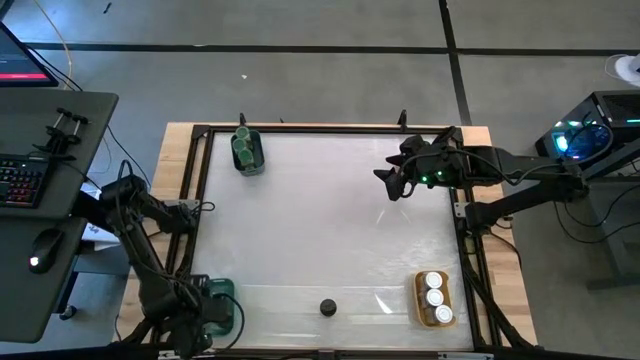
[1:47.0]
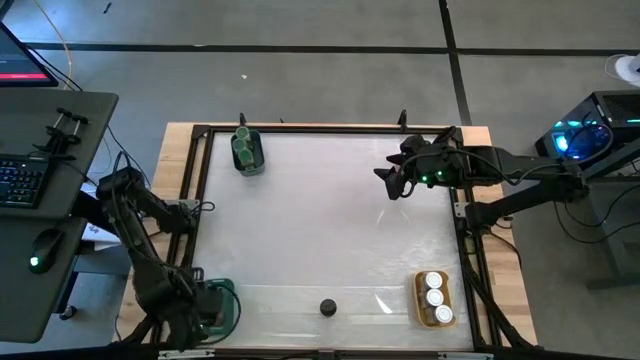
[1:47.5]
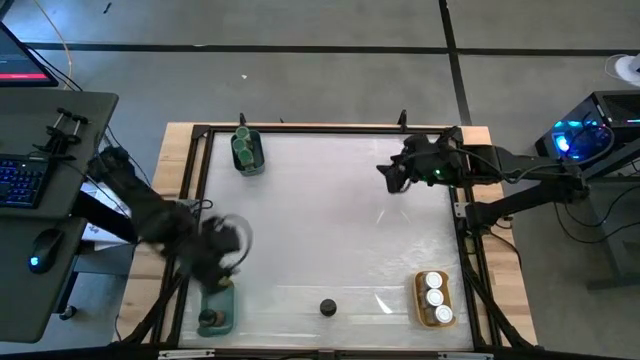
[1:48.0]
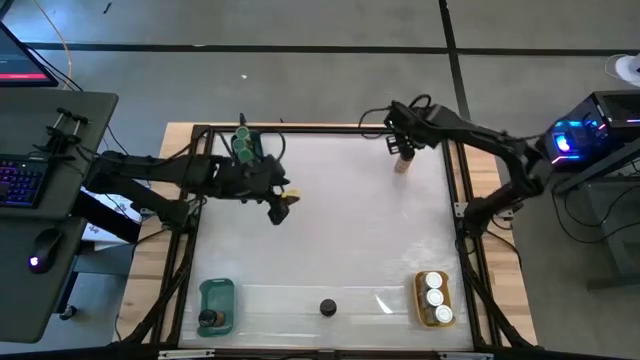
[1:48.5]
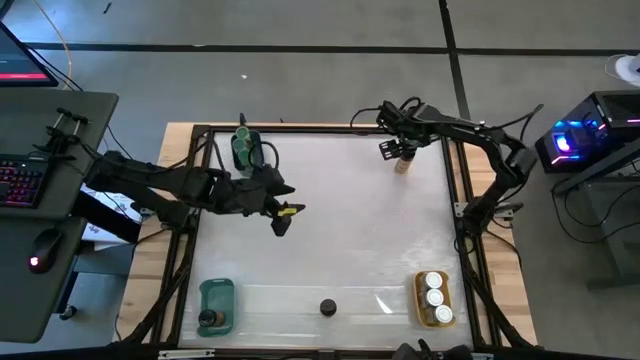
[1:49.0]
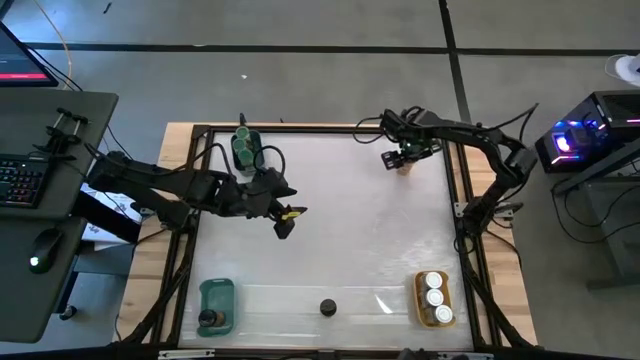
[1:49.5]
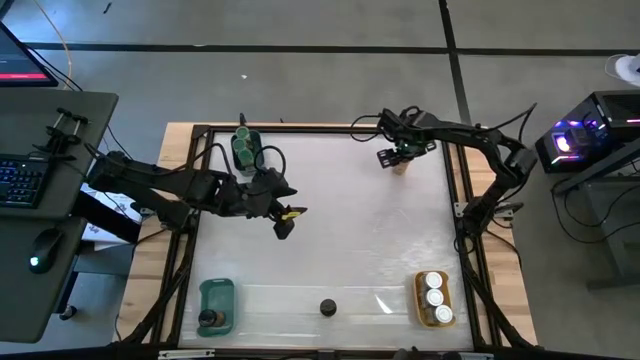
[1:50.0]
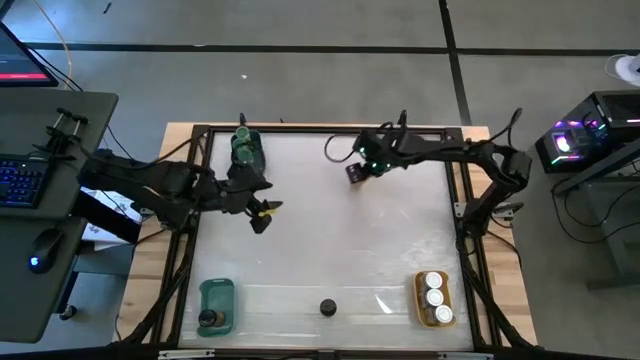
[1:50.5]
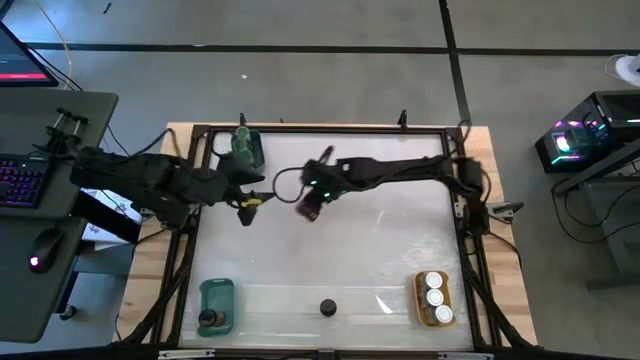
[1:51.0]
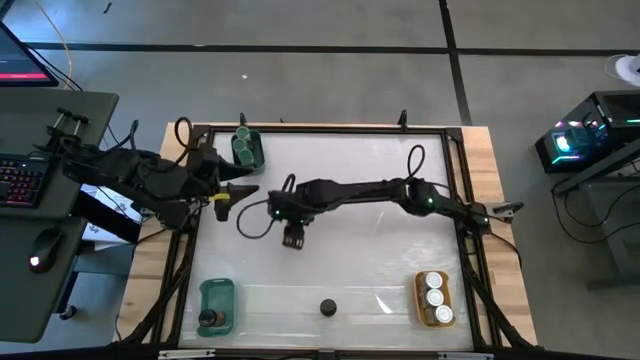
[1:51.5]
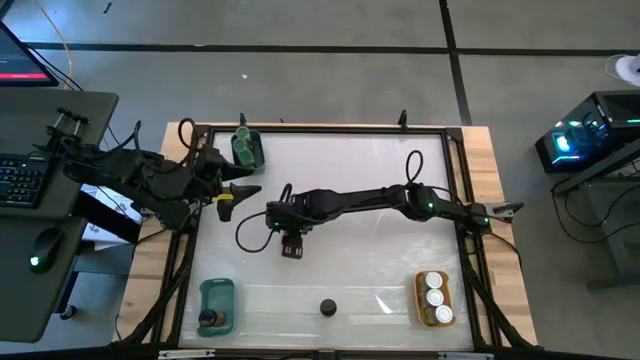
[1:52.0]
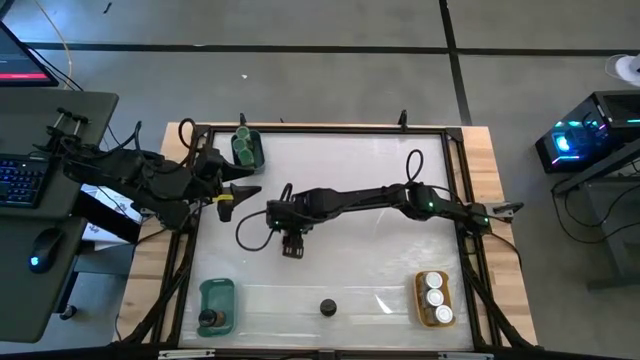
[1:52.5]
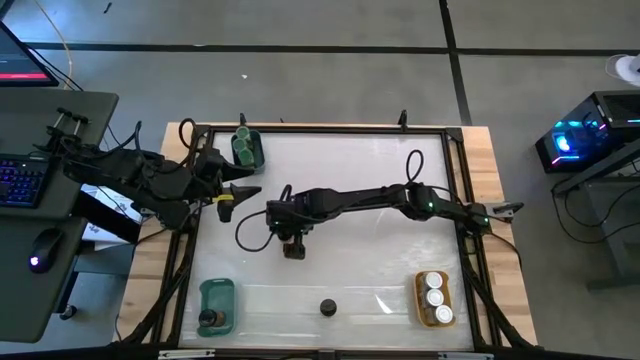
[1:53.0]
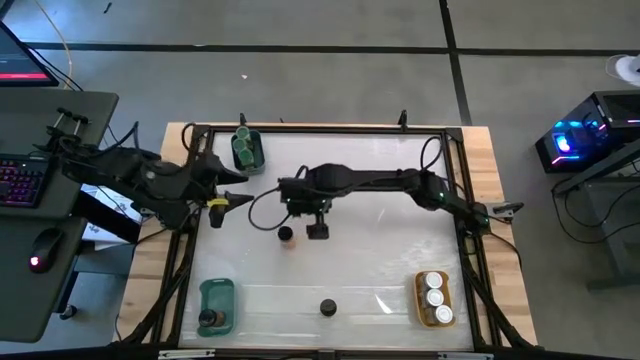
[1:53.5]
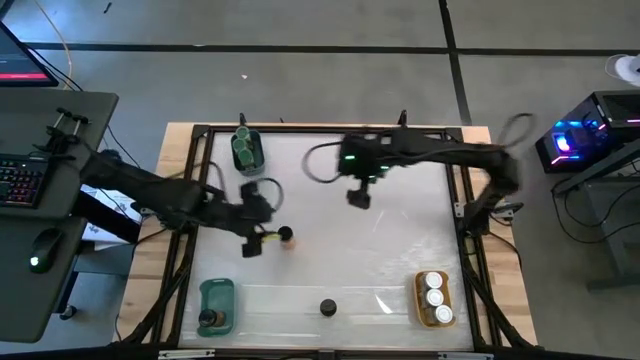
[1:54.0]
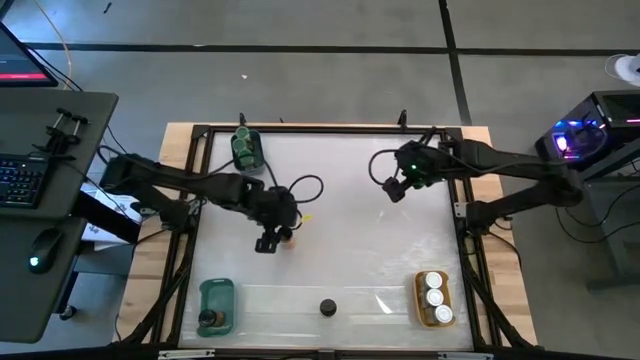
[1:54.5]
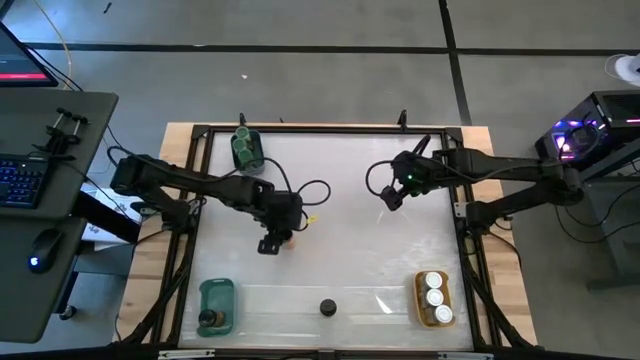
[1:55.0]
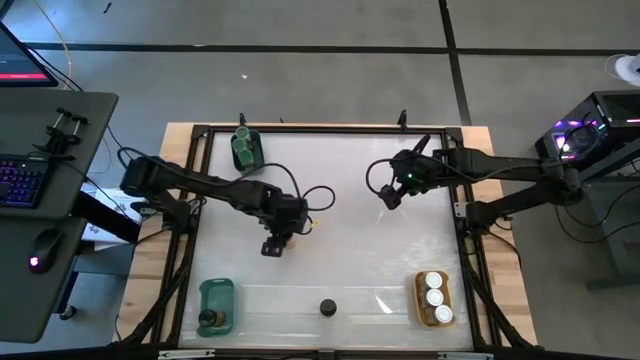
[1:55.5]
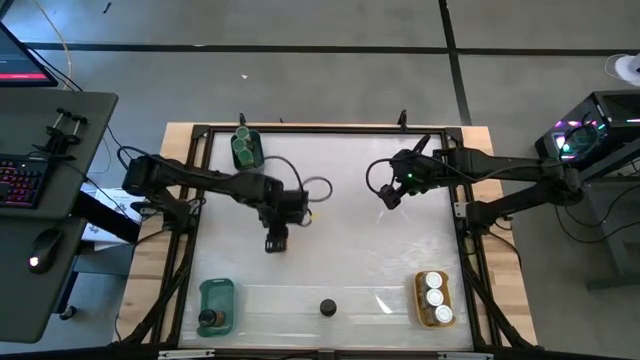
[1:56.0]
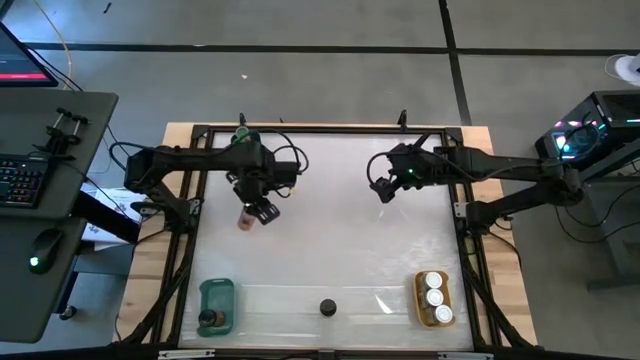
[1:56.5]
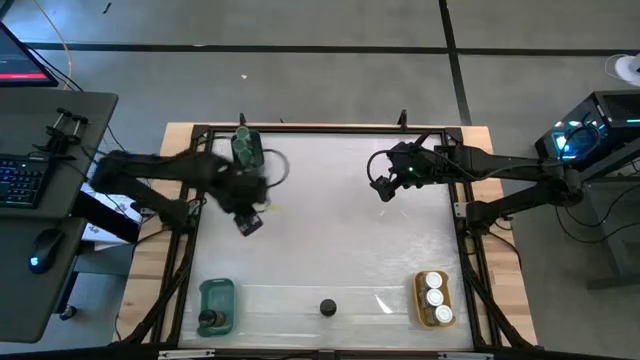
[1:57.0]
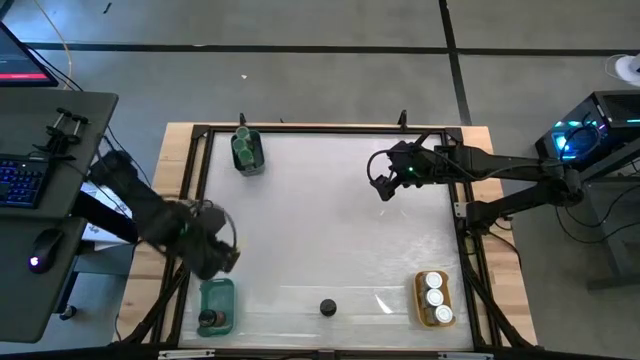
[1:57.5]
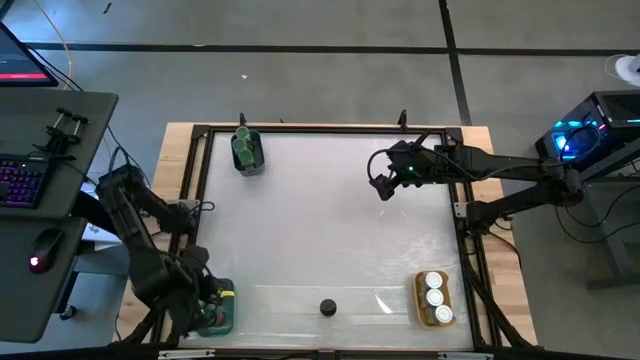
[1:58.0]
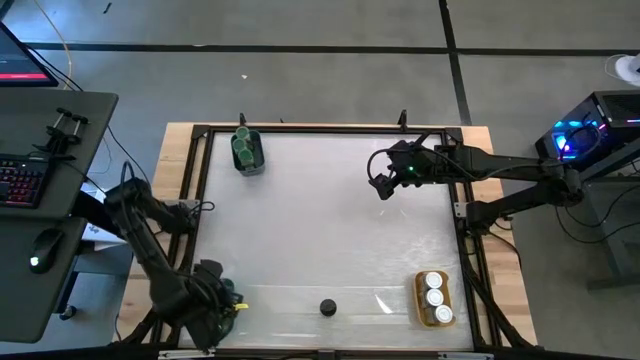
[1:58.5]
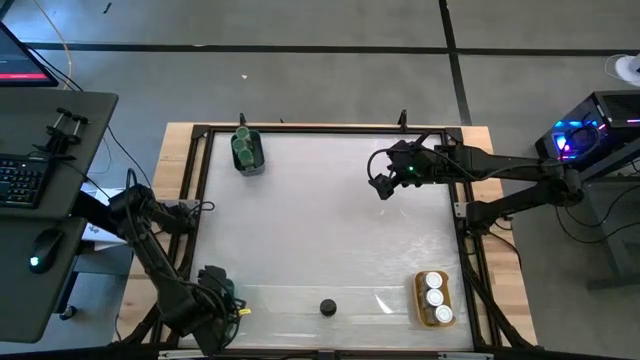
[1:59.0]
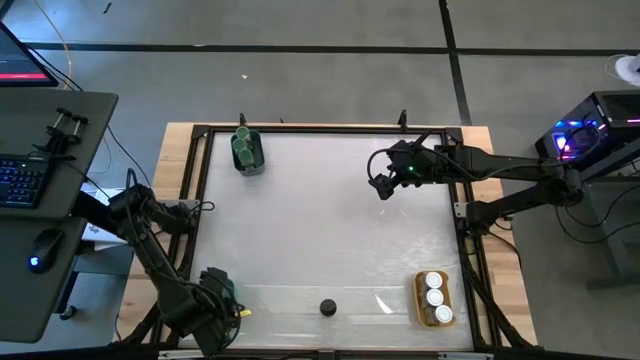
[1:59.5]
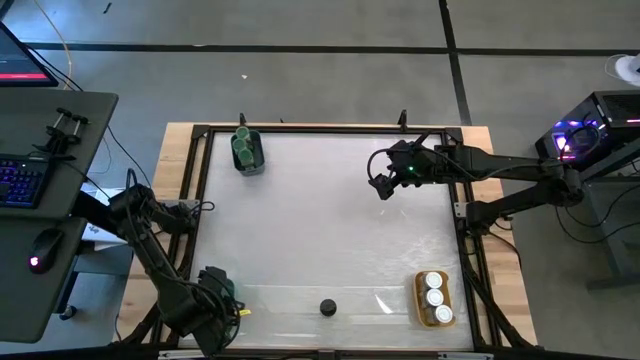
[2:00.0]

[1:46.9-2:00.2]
Task: Sort spices by type
Put the top black seasoning bottle into the green bin

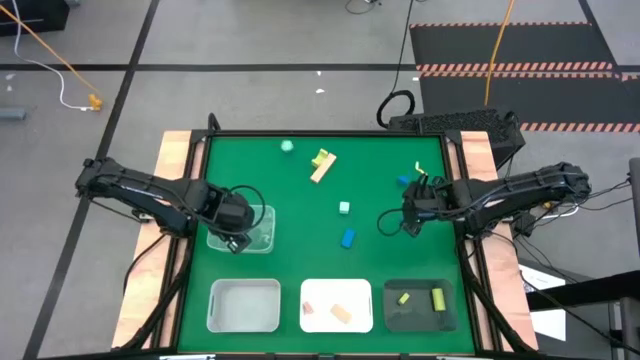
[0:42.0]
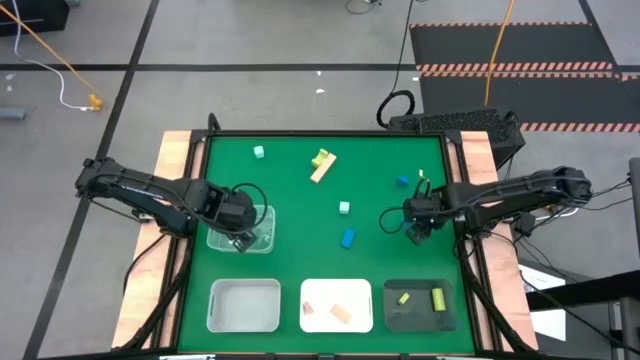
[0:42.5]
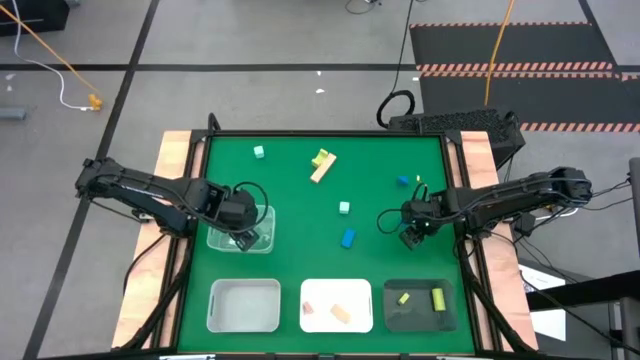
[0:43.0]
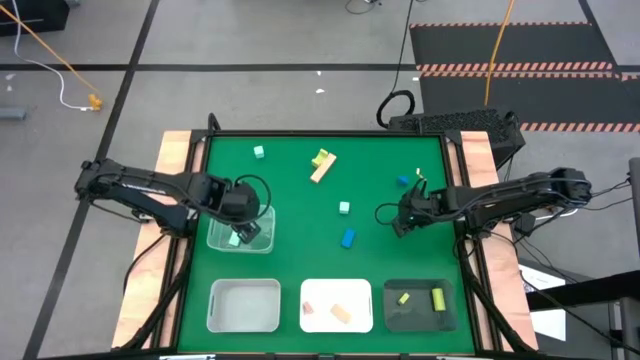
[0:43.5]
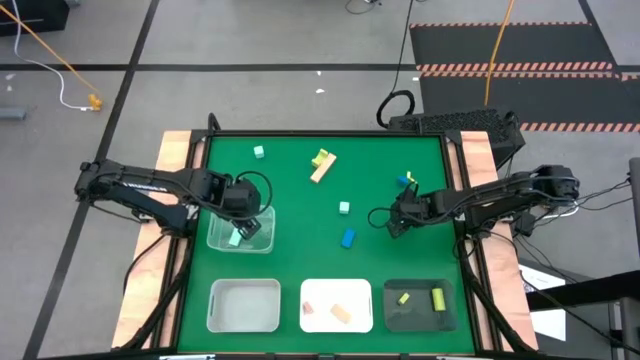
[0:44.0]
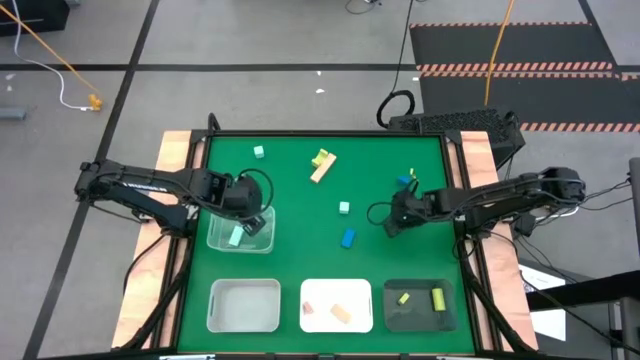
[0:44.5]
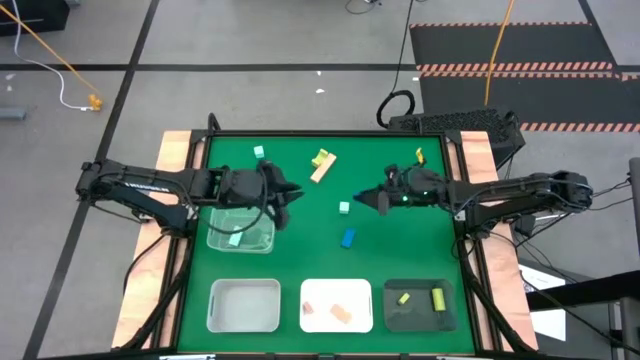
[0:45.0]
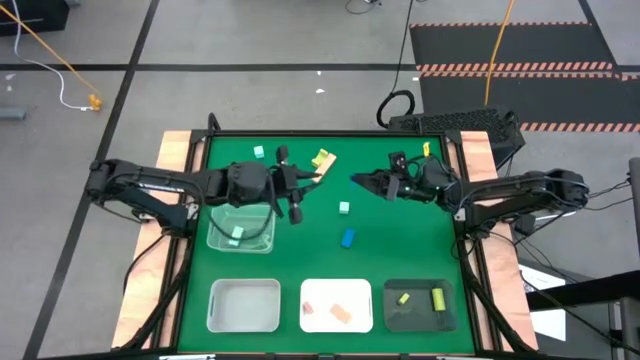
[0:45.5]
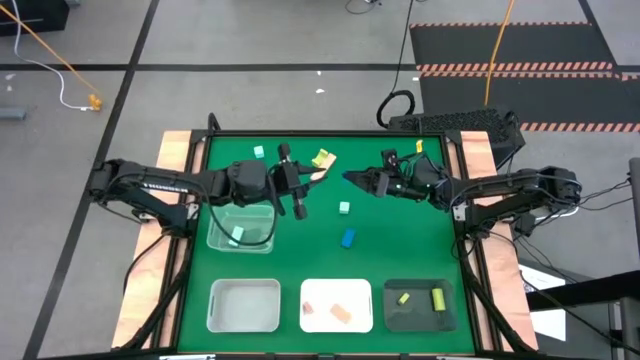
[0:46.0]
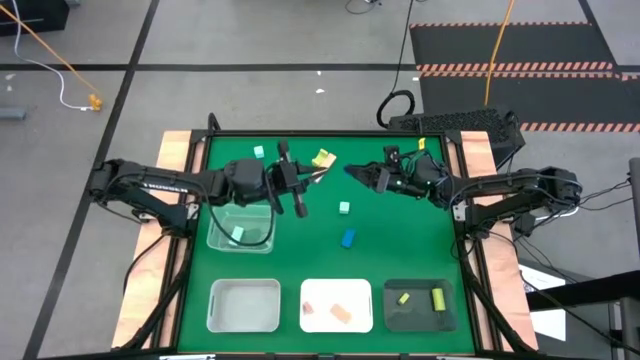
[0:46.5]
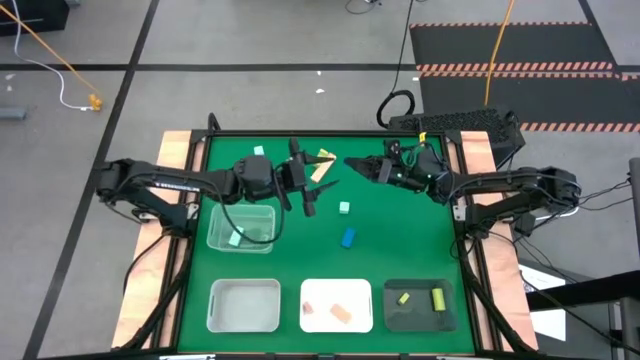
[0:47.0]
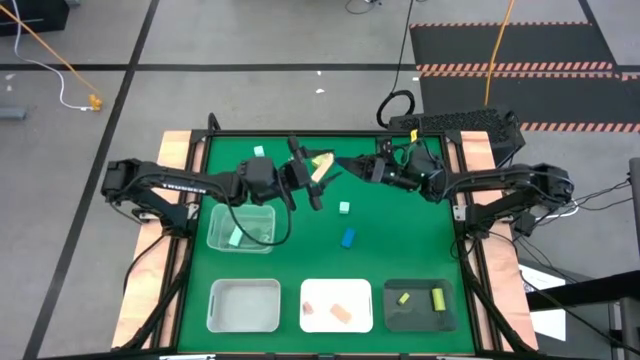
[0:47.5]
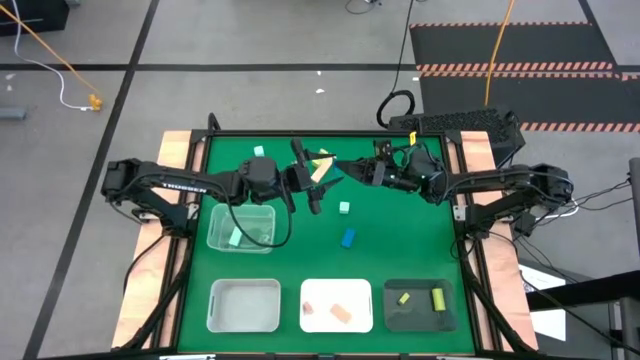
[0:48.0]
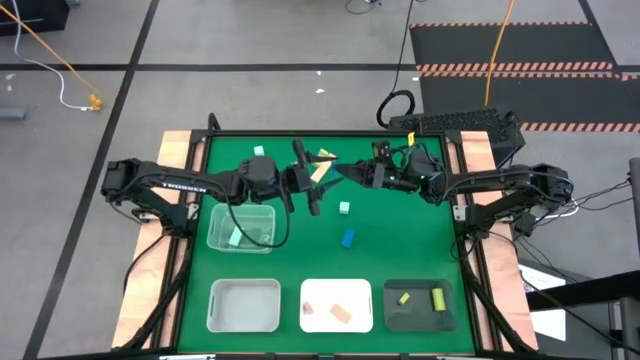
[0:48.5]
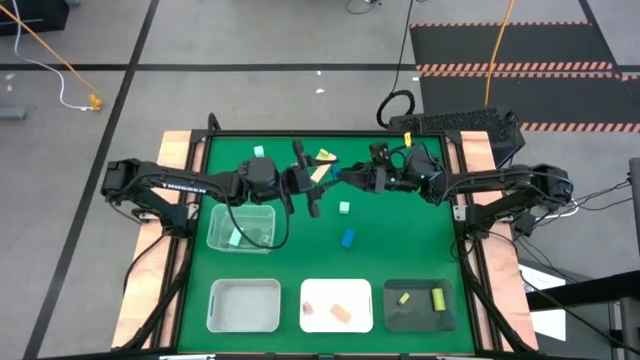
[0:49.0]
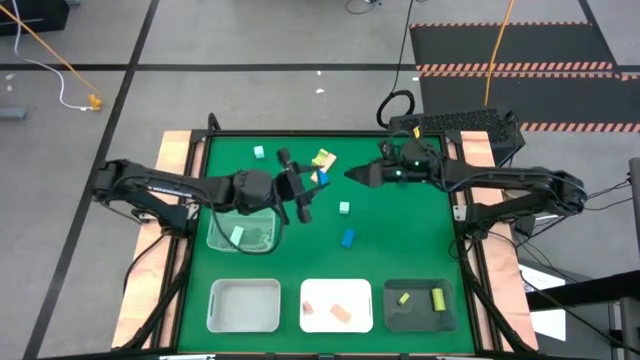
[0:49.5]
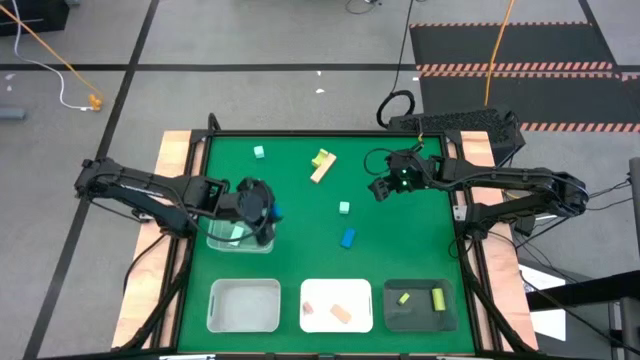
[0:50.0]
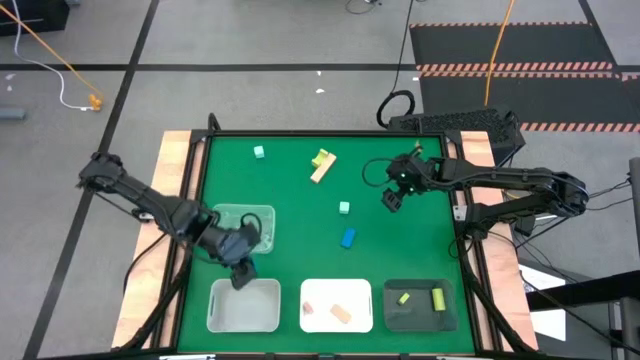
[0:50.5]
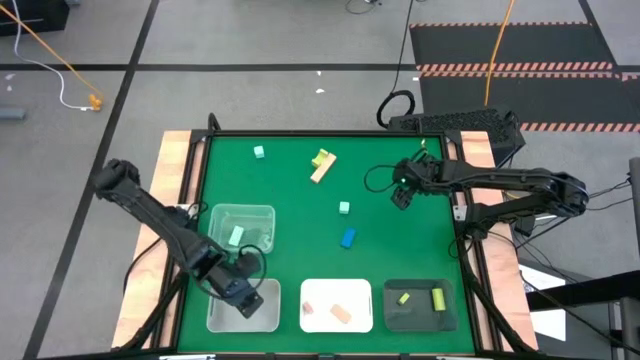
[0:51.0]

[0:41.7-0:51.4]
Task: Sort & place blocks by color
Put the bottom right blue block into the gray bin
